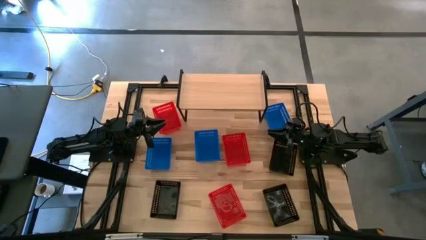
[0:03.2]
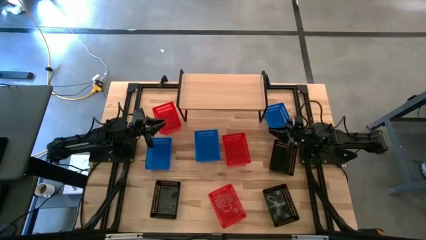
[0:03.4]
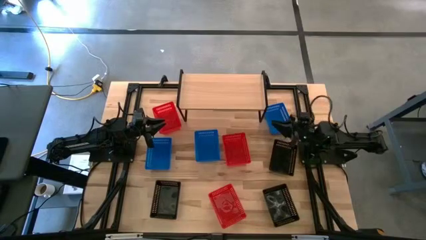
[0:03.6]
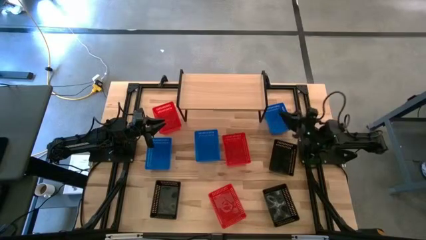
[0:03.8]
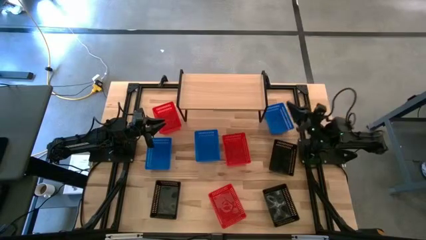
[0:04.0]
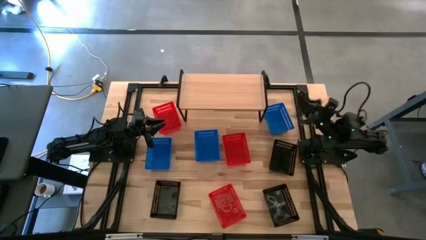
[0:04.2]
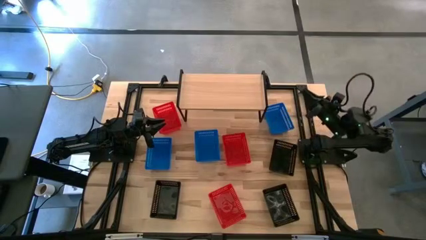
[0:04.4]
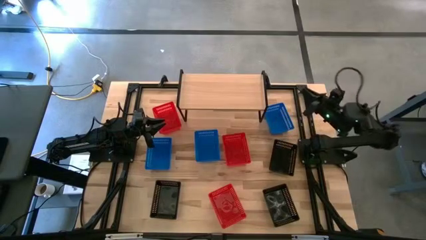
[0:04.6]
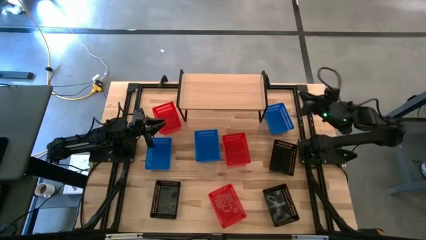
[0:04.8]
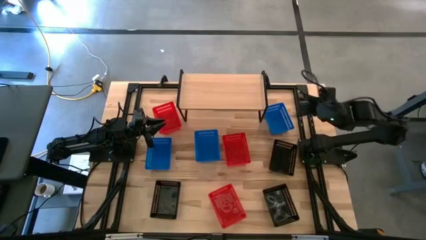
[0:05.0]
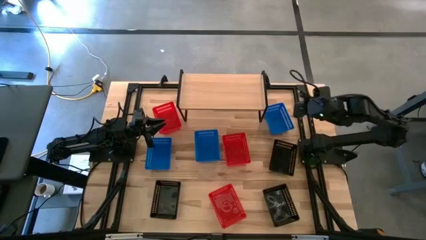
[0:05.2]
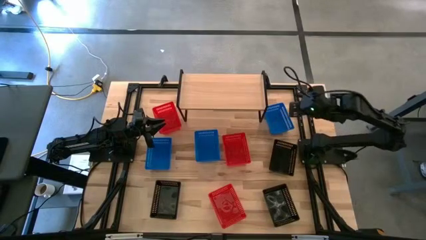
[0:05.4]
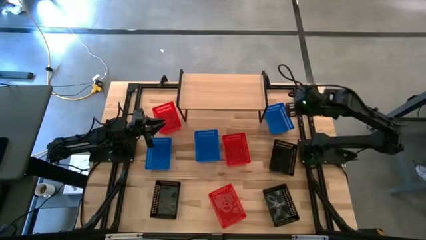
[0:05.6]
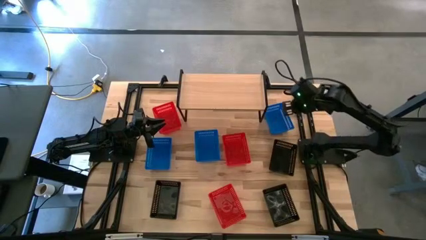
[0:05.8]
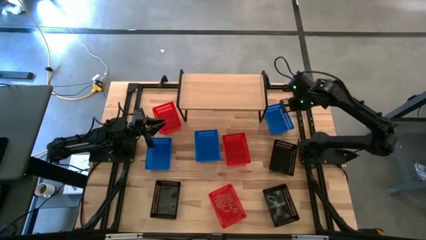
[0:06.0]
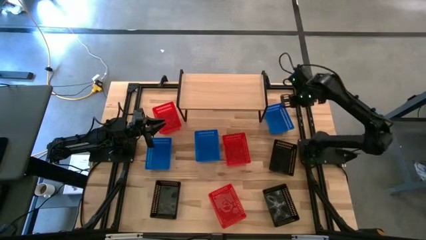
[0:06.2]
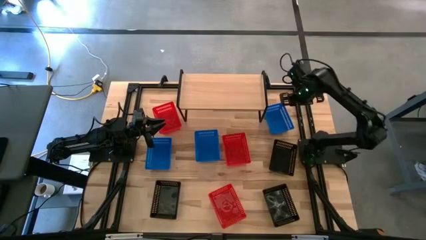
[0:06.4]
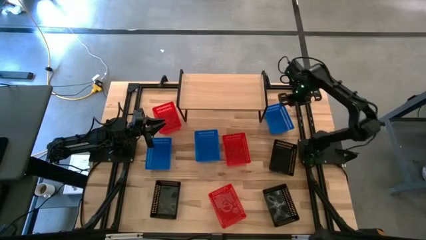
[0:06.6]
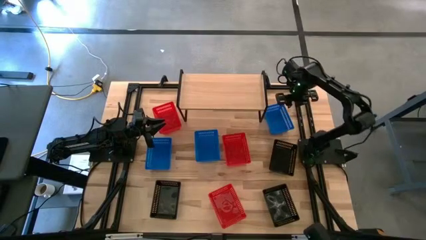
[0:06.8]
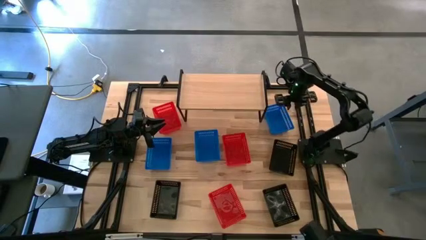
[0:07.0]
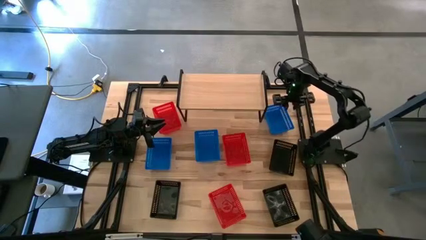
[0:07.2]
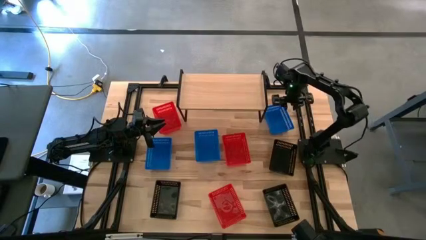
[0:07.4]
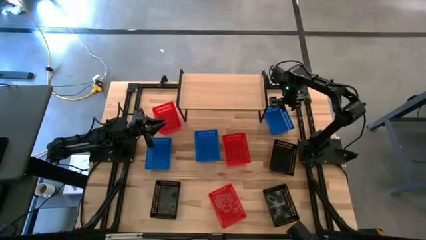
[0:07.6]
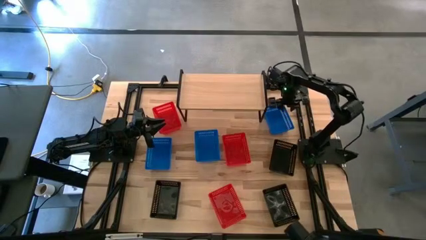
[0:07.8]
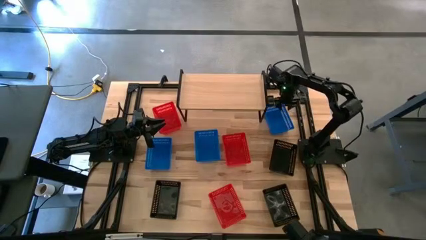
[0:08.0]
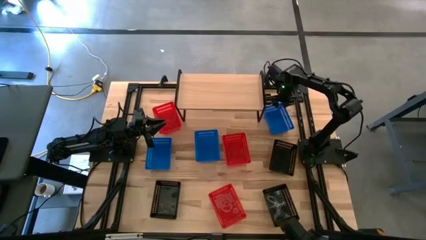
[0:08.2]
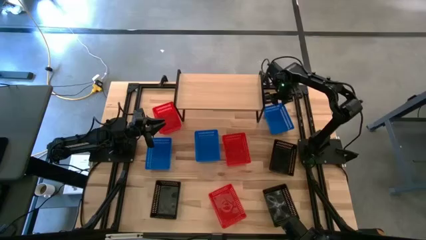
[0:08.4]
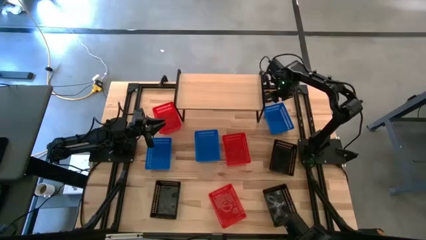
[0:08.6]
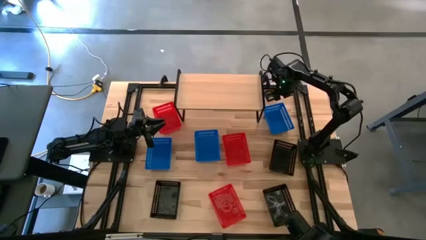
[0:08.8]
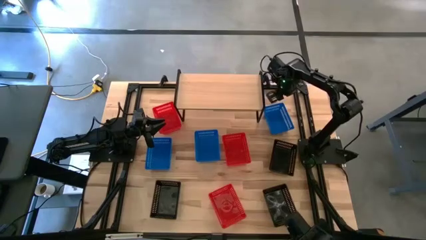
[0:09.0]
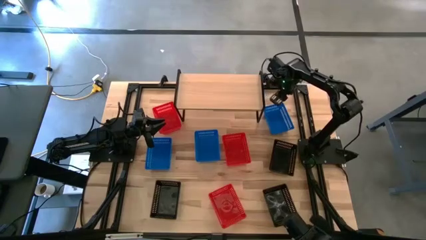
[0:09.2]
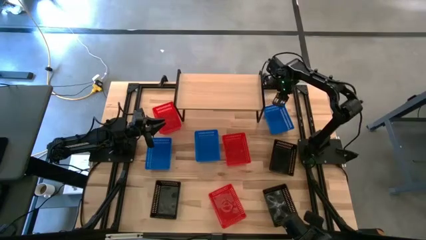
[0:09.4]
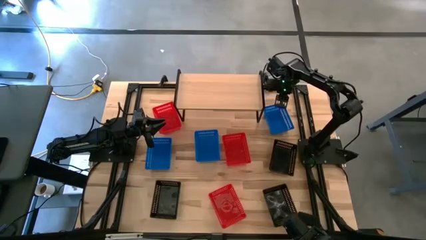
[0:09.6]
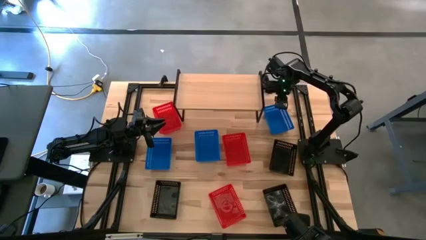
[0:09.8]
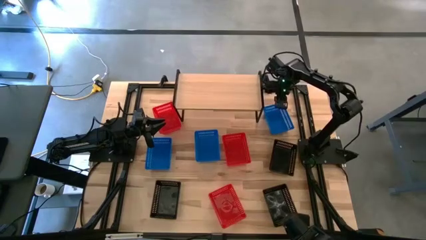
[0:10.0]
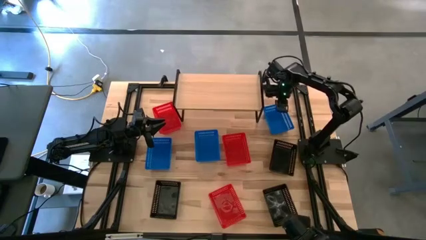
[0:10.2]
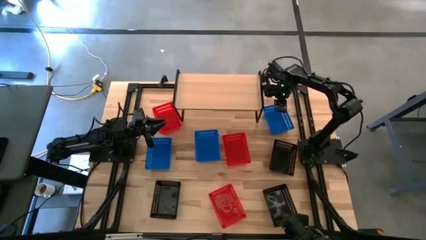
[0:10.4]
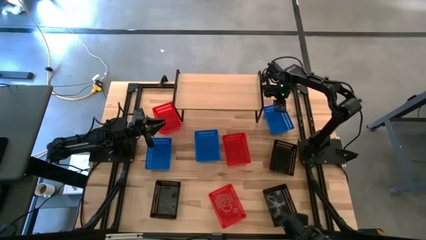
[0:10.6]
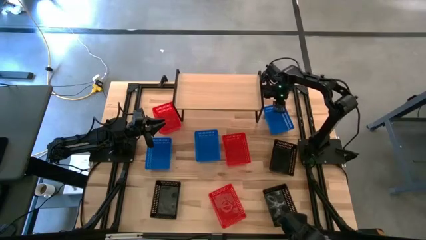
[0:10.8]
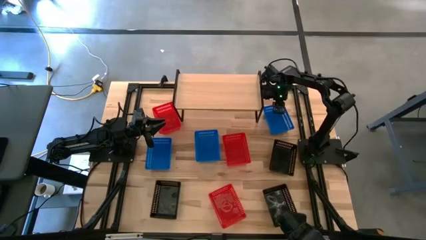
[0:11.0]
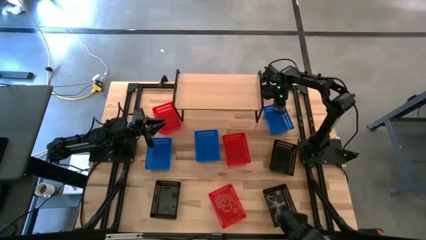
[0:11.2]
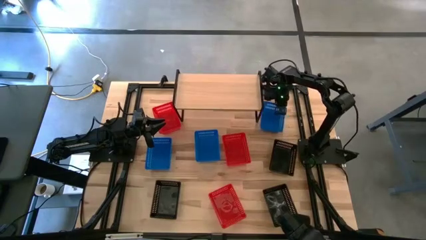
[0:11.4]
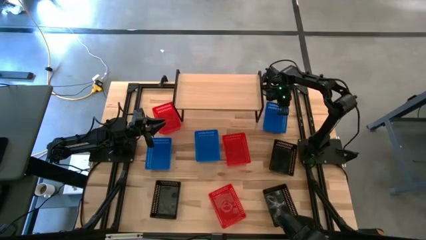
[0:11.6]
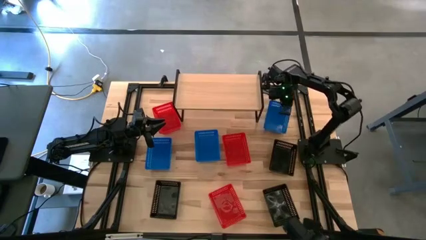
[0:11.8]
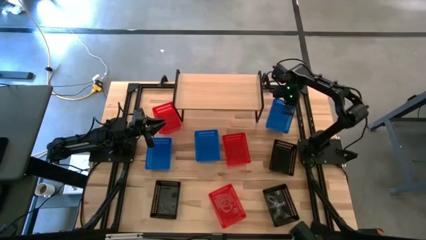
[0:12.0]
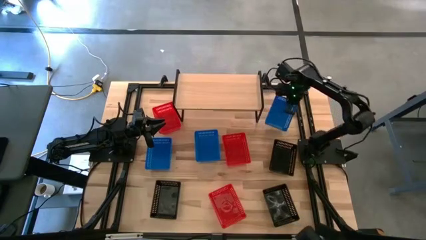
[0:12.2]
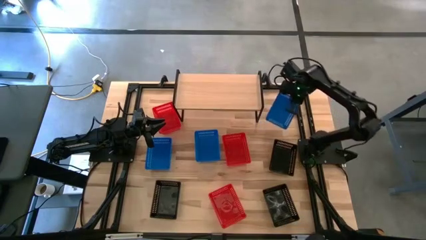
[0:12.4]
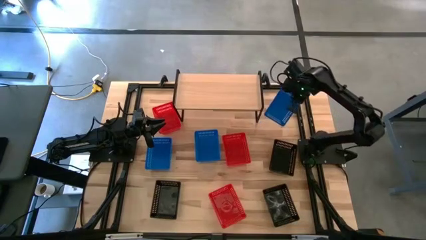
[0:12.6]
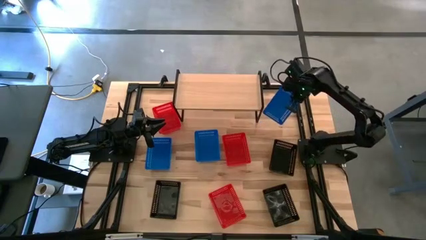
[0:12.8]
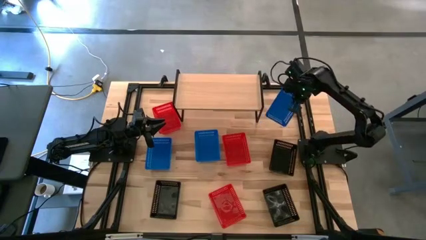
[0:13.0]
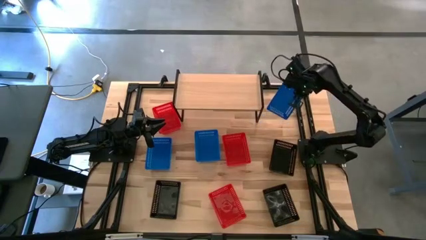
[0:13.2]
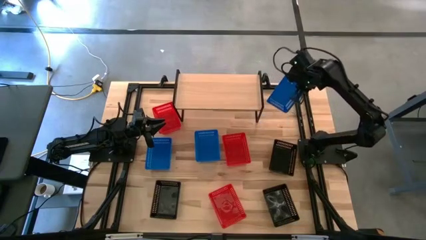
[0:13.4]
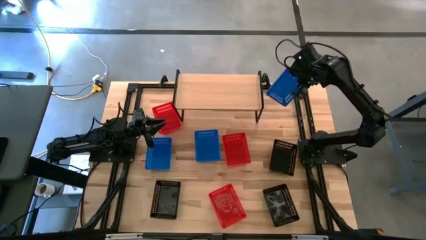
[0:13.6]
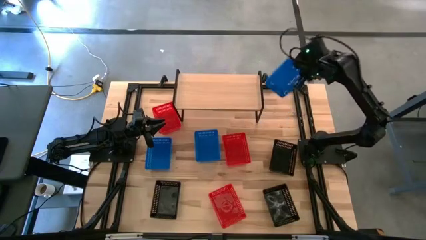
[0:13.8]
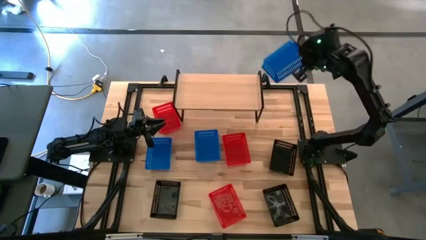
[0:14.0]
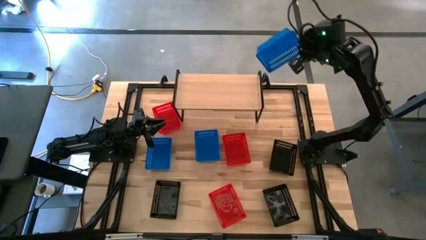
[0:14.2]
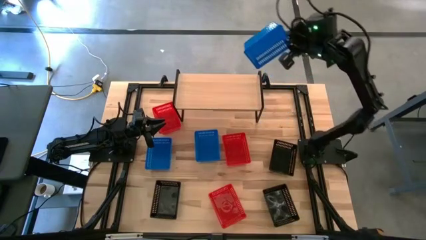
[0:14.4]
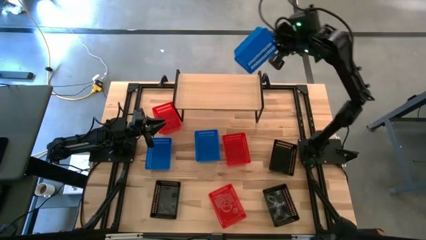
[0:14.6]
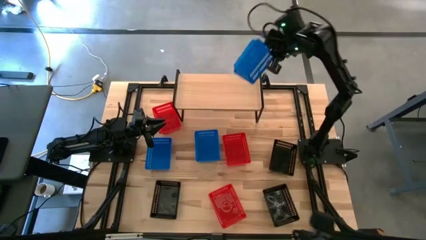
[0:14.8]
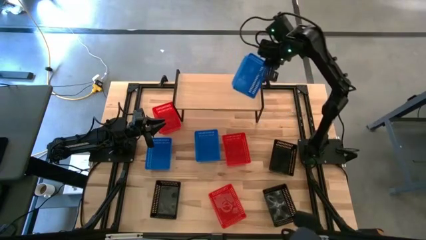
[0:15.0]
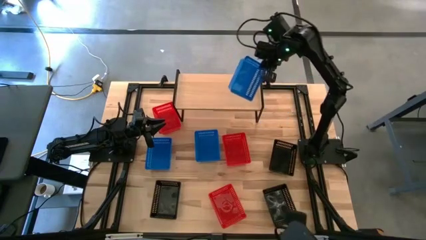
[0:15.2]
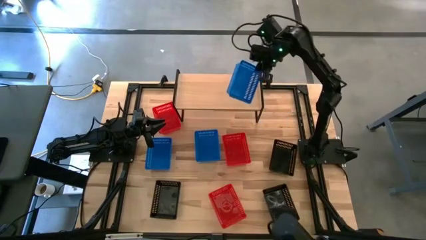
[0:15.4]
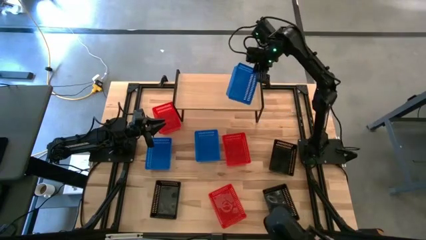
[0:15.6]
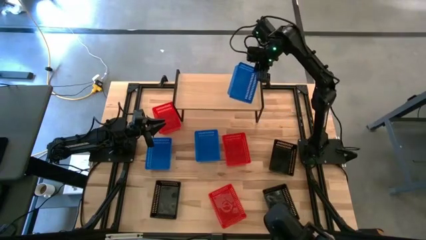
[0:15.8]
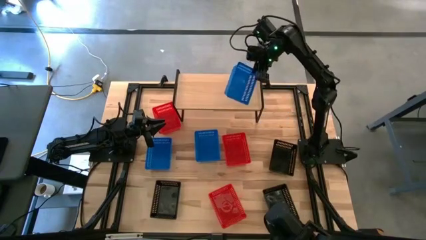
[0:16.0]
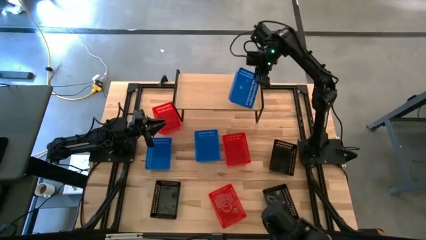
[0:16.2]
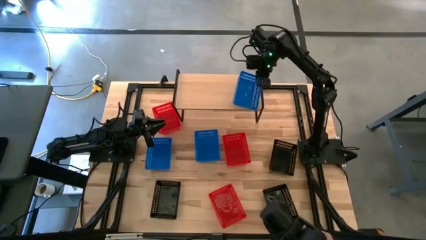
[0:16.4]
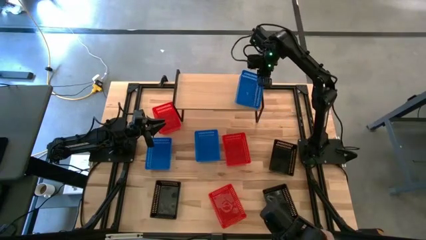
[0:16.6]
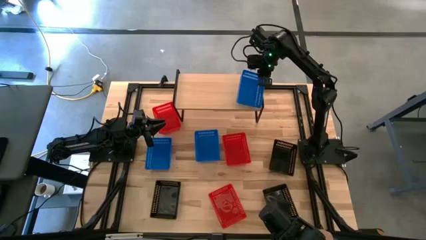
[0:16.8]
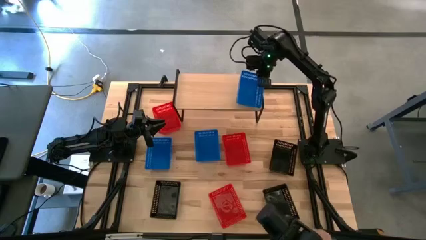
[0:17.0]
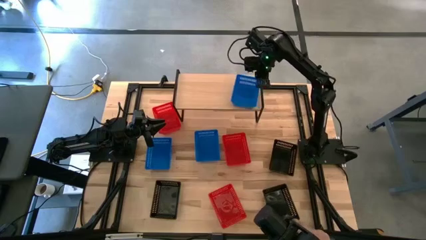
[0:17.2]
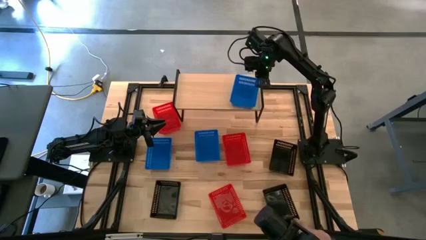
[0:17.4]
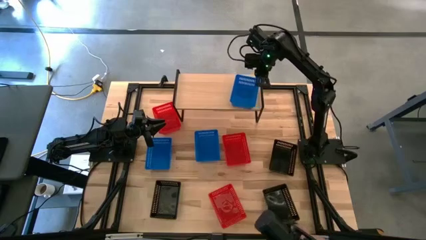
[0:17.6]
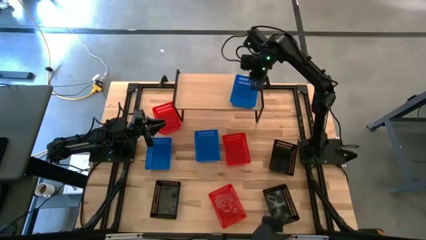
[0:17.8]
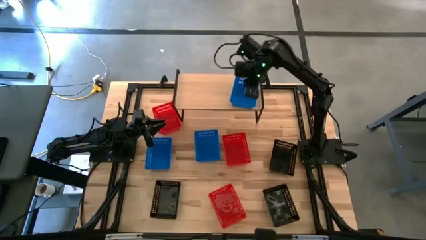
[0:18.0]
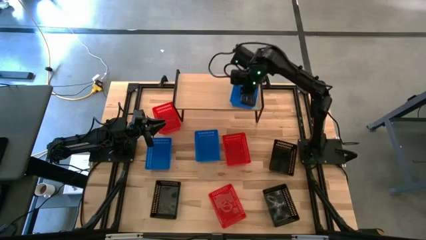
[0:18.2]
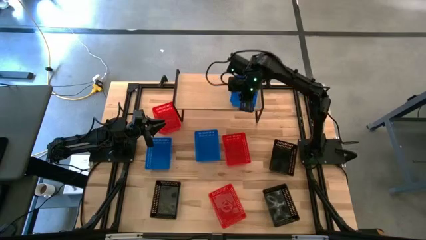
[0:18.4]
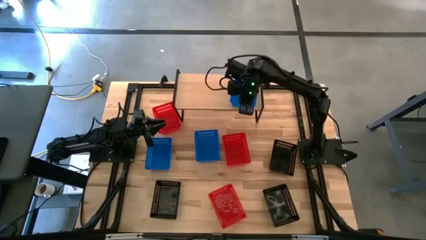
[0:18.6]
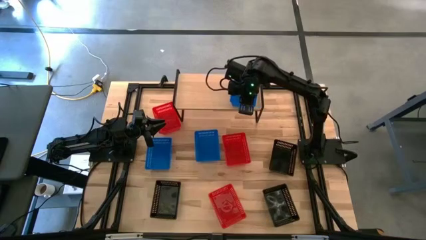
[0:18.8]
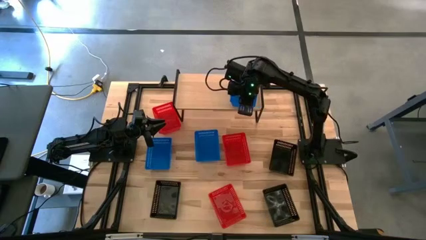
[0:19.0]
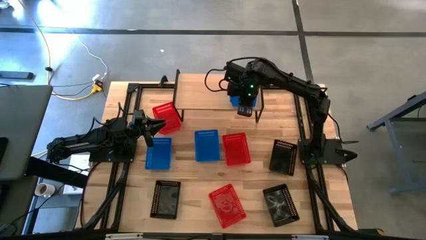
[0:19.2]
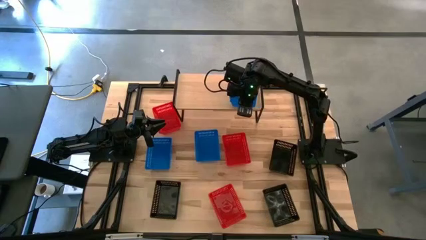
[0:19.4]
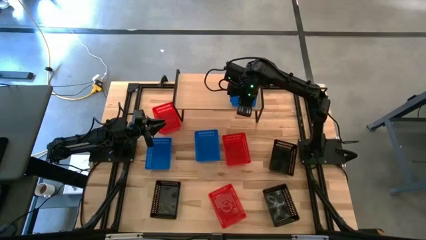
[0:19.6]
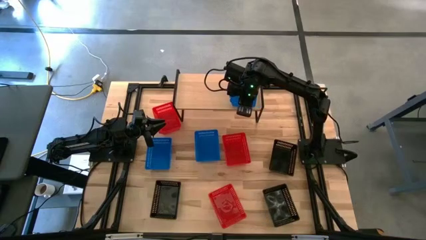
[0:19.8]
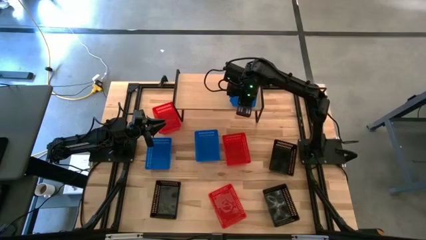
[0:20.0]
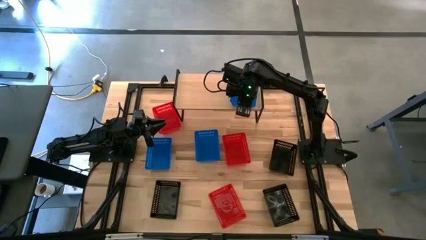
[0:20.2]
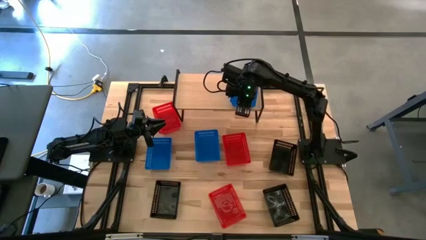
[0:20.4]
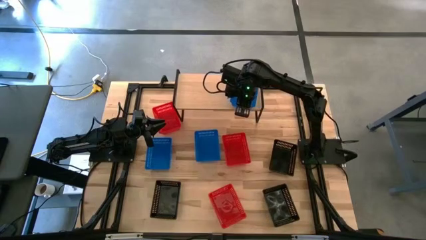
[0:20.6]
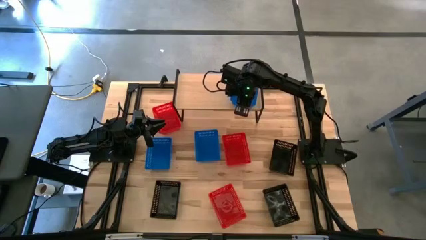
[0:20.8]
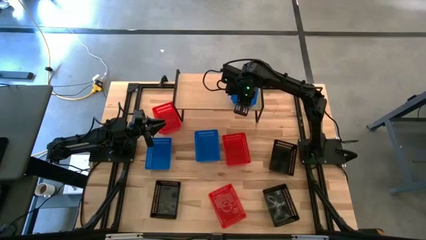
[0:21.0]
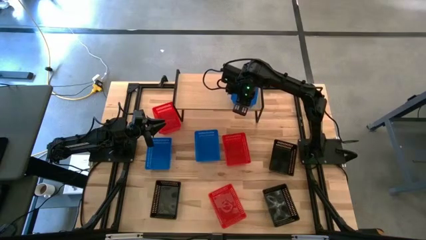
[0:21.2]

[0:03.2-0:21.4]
Task: Stack baskets on shelf by color
Put the right blue bin on the shelf
